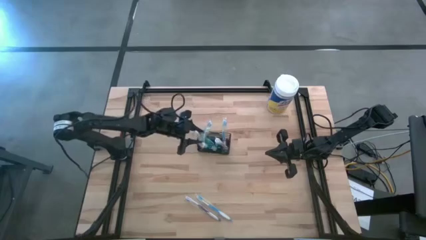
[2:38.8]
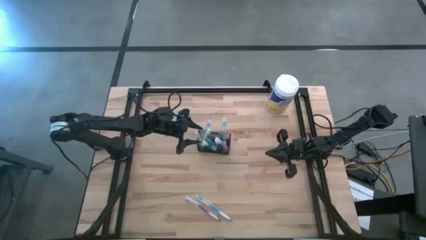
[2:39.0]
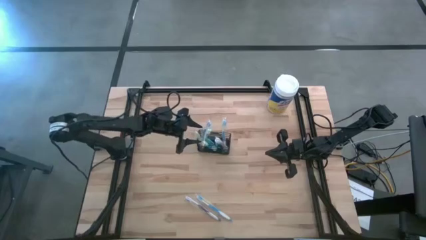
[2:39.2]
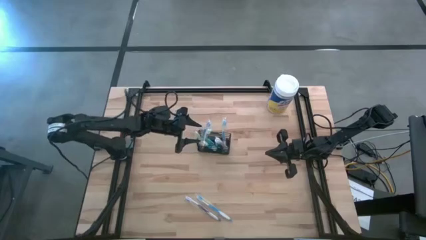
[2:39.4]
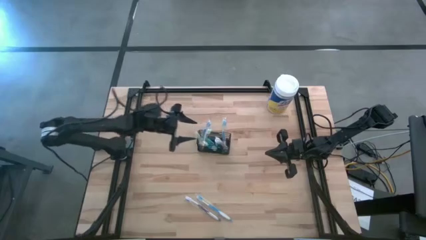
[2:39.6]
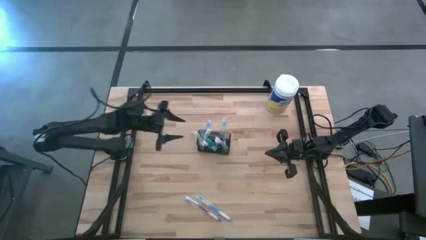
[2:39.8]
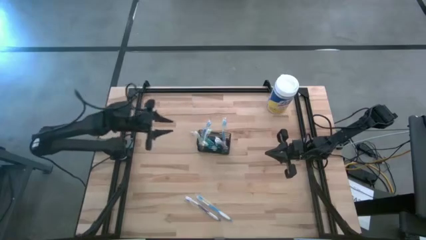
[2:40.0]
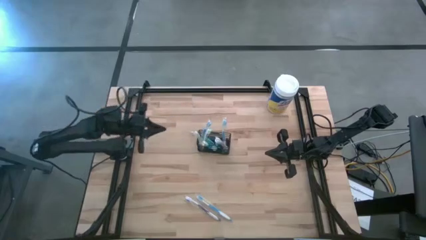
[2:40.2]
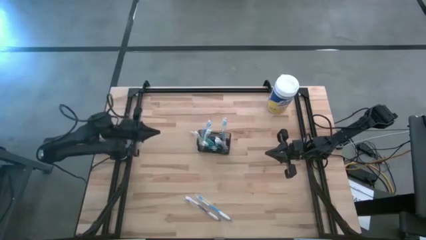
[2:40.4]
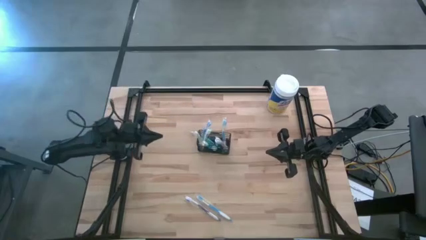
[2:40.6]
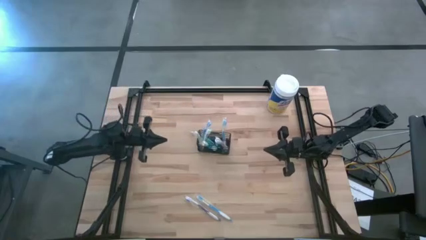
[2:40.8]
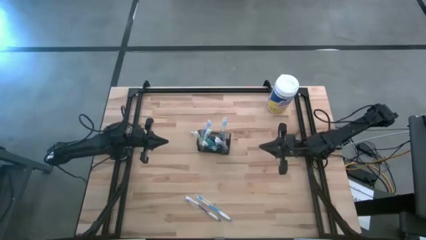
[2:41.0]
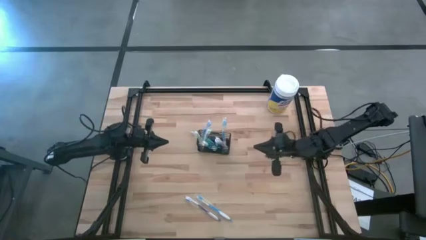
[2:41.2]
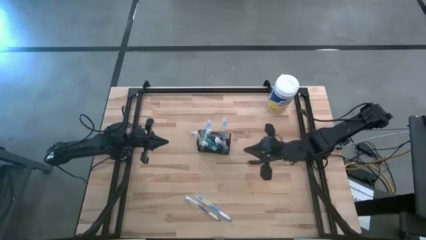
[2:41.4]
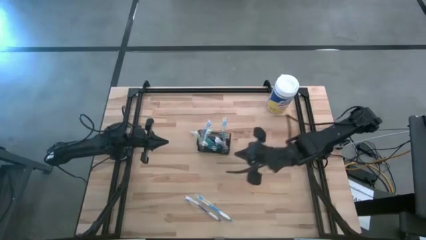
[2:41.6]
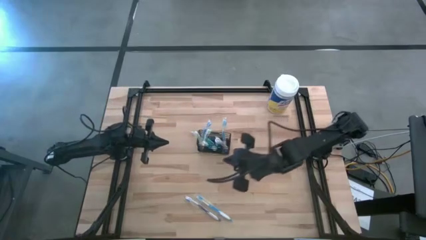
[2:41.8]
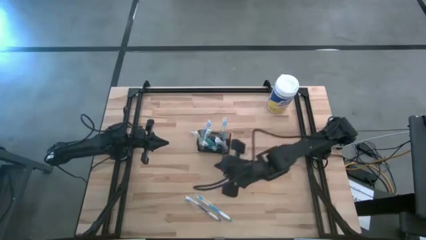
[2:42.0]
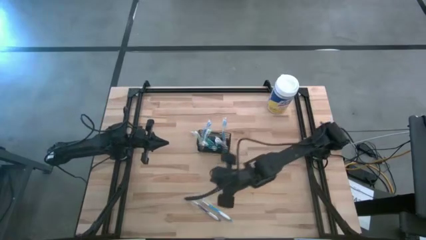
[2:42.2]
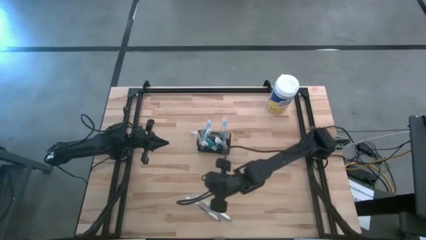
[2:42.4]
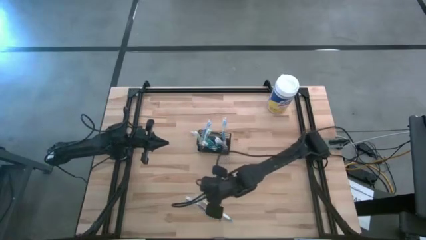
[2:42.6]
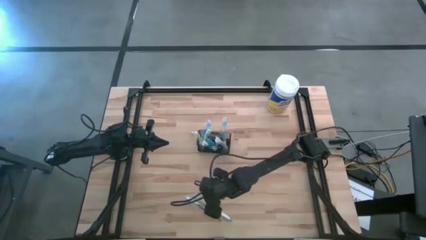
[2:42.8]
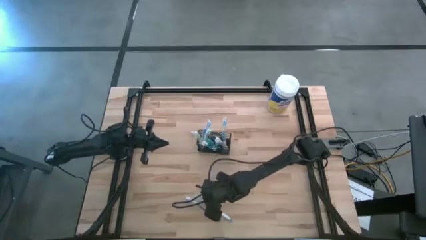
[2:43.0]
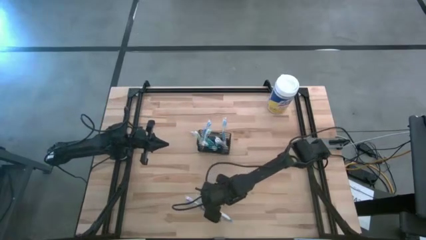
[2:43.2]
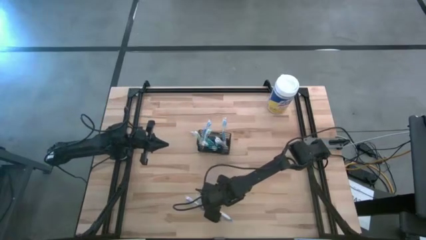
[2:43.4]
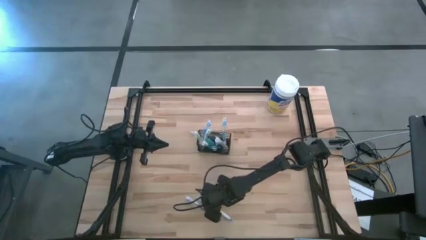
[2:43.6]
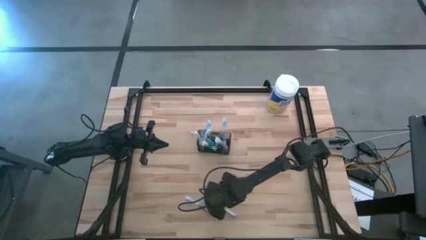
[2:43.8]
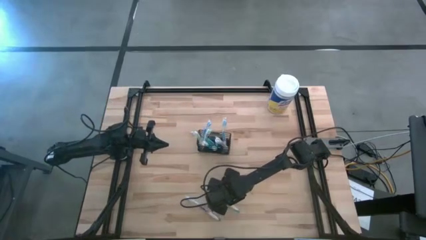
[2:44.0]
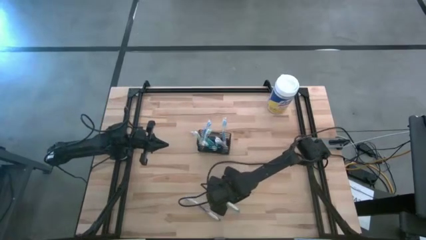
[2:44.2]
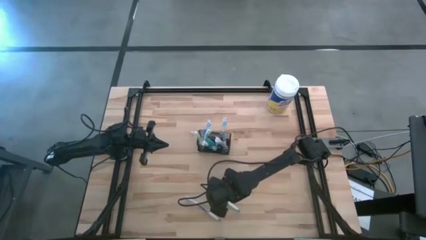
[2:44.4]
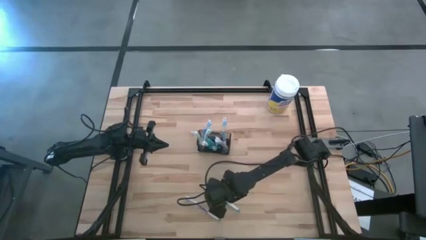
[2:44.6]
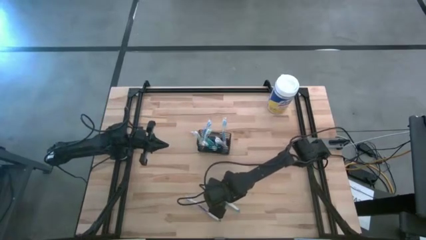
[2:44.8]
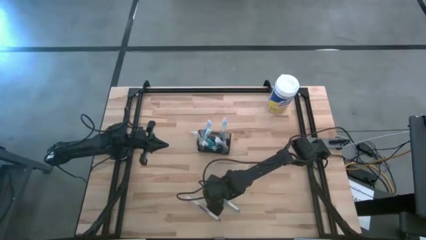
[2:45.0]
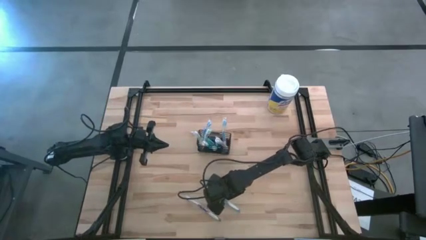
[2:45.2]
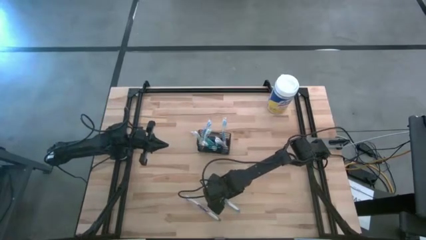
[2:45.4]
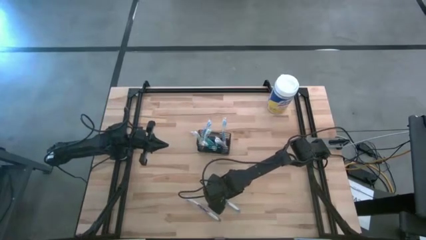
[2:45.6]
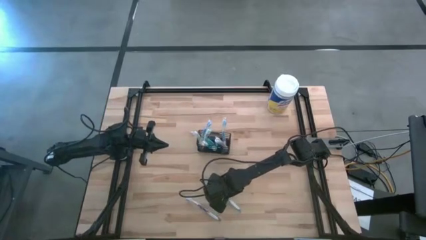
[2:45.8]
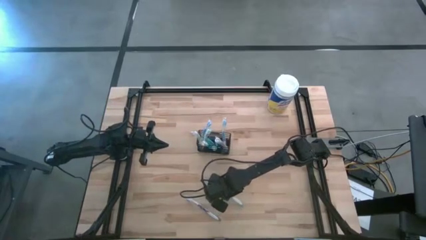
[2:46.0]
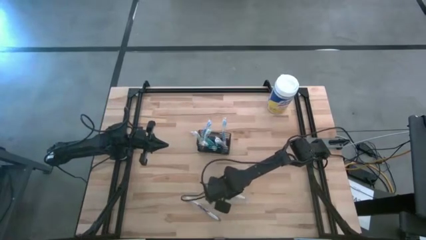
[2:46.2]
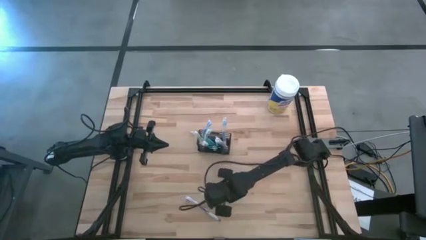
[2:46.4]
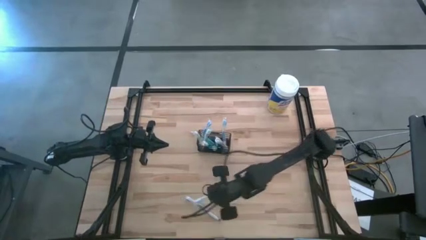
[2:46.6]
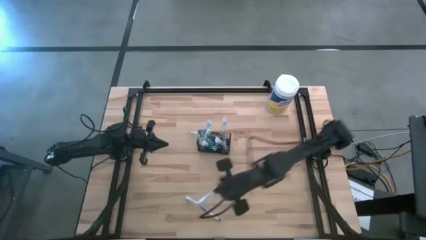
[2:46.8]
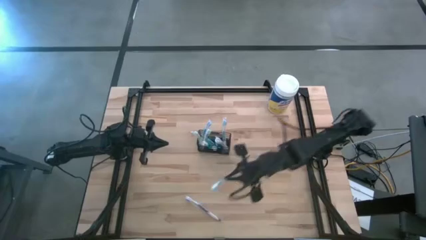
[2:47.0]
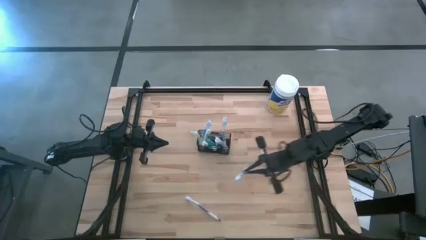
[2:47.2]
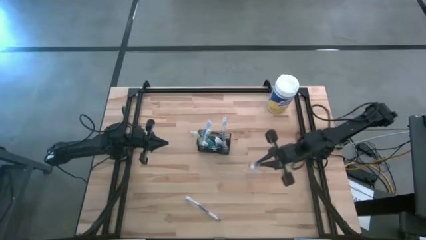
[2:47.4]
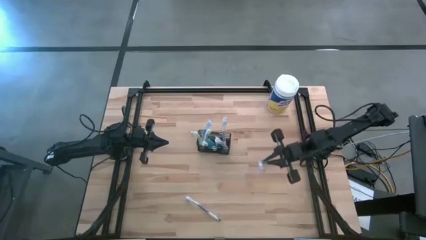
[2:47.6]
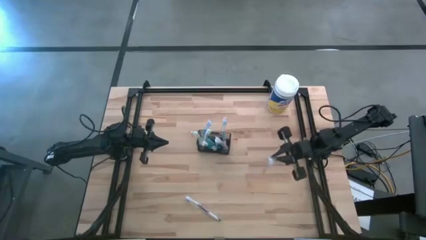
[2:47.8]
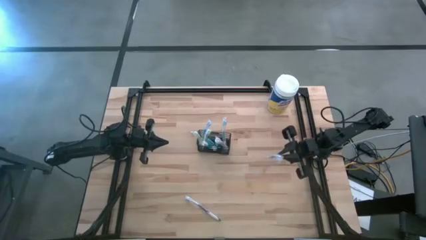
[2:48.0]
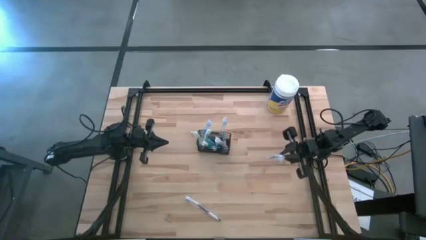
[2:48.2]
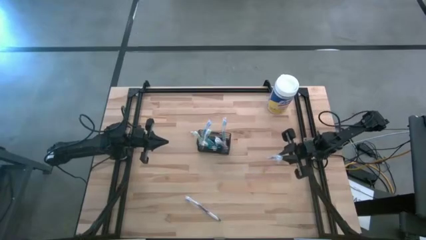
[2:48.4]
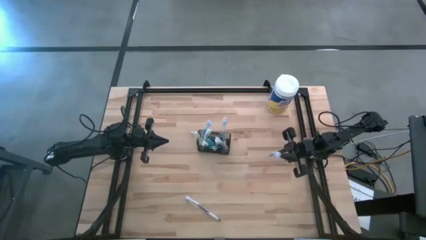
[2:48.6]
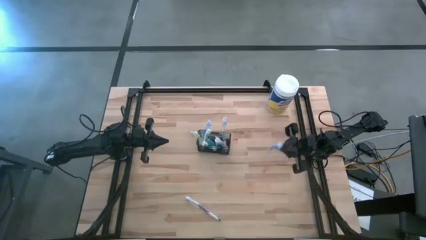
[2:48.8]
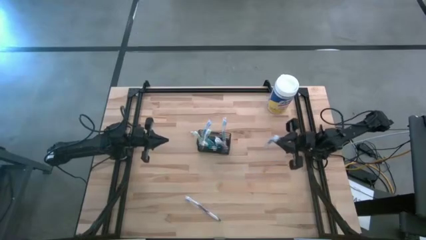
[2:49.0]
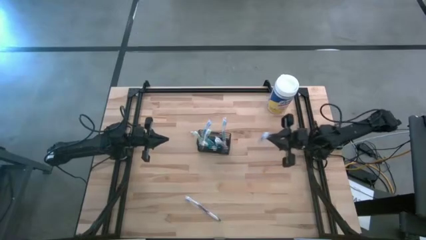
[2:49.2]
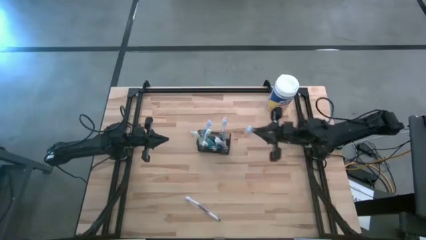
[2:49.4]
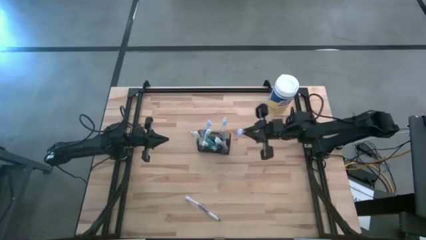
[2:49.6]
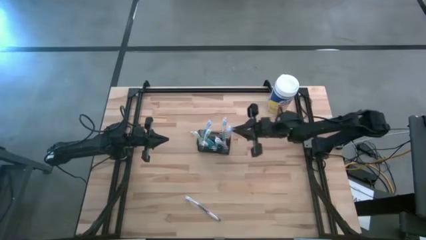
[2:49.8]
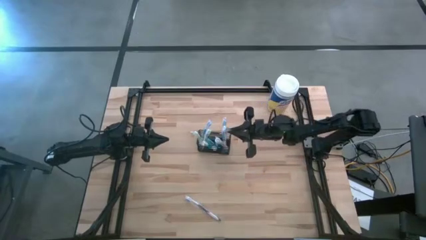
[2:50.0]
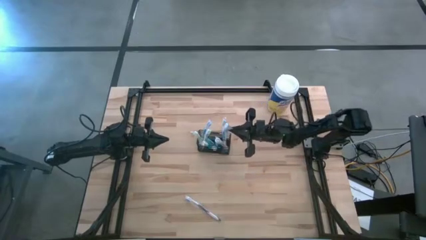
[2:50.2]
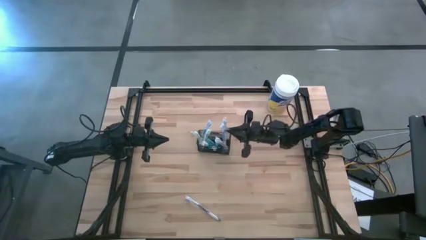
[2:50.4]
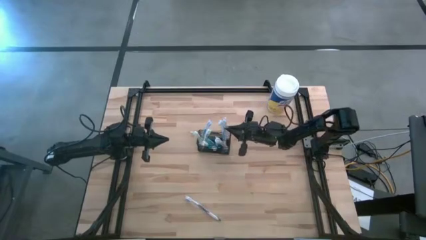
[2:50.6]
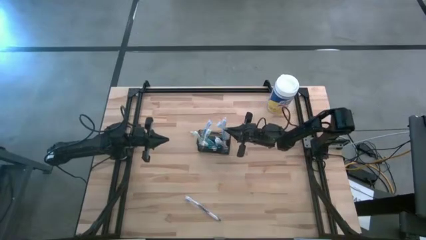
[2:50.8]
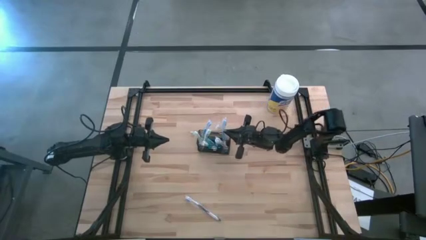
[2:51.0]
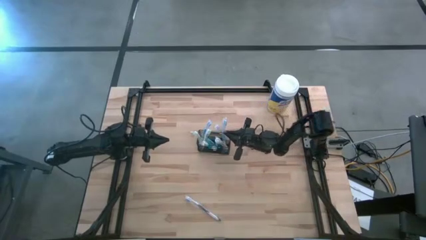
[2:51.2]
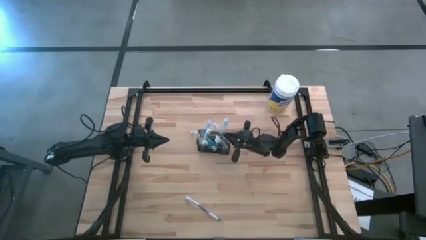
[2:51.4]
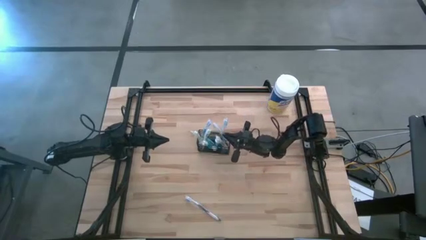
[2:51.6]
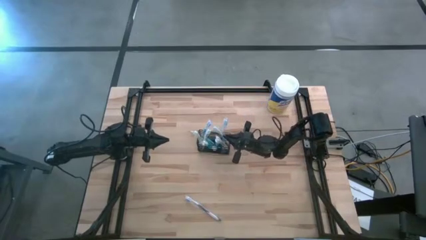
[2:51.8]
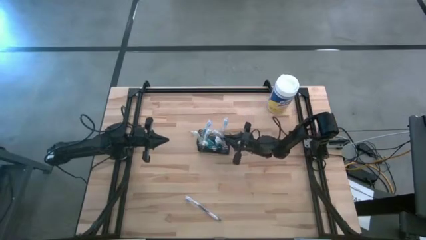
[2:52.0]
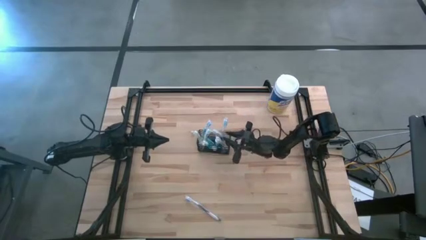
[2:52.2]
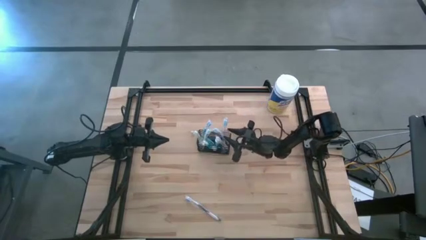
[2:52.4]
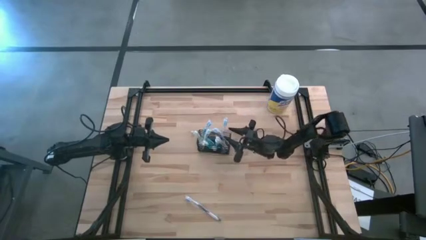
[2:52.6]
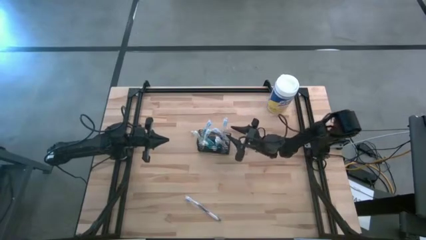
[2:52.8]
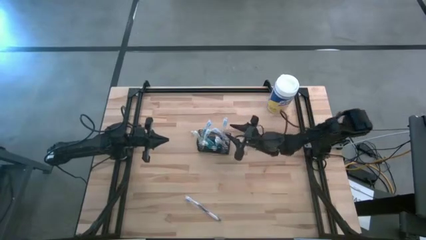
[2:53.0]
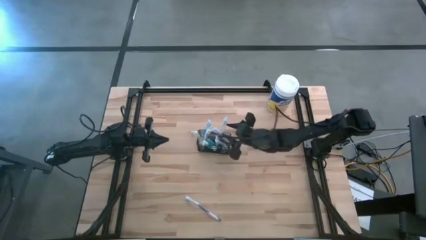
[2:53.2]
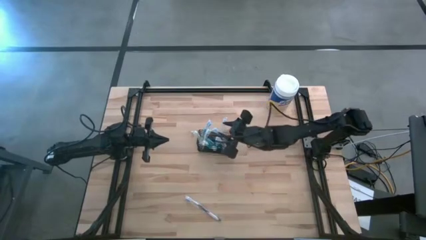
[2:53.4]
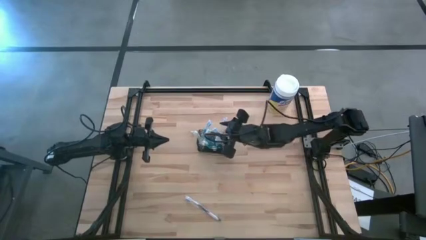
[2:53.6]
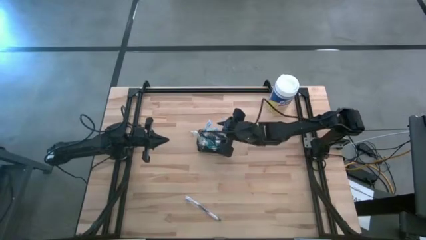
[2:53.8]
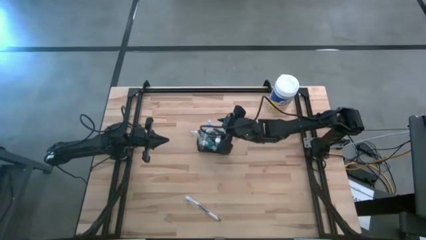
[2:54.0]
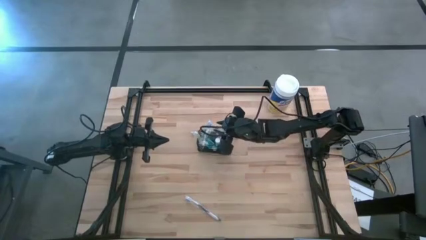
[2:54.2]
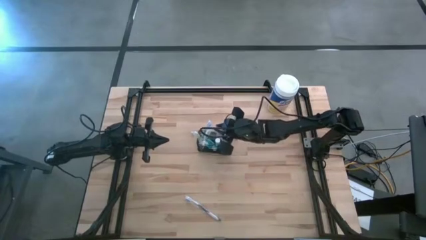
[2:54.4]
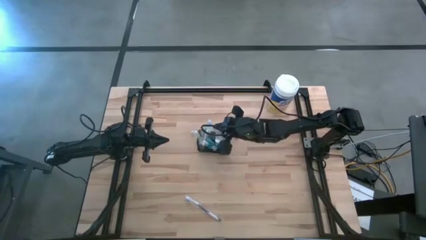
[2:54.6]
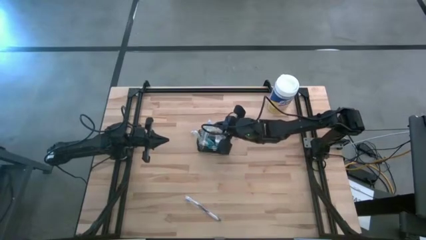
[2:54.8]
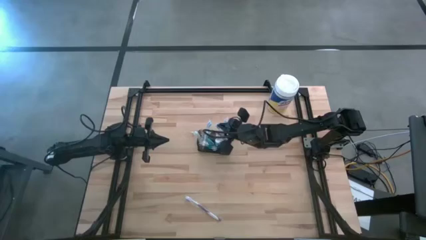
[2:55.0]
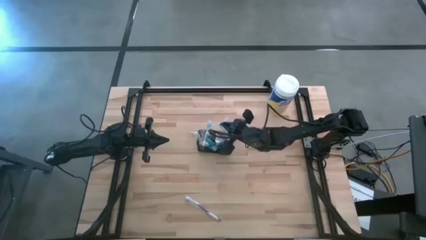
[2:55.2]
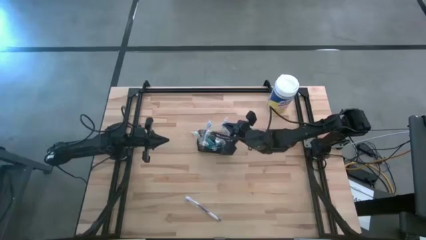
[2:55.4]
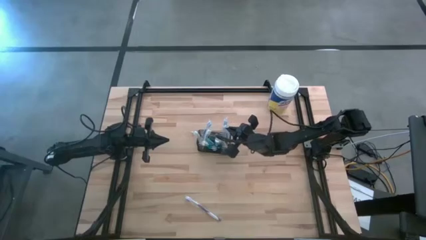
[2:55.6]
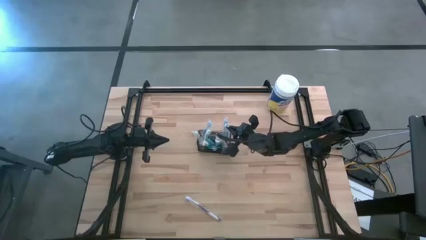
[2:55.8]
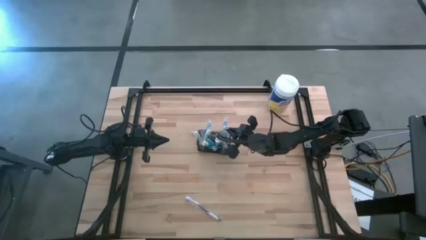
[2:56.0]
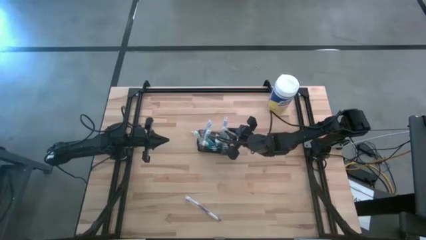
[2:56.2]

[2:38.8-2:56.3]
Task: Pick & Place toothbrushing station
Put the blue toothbrush into the black wire organizer

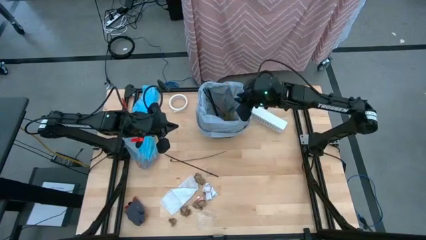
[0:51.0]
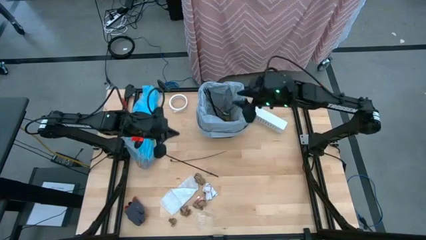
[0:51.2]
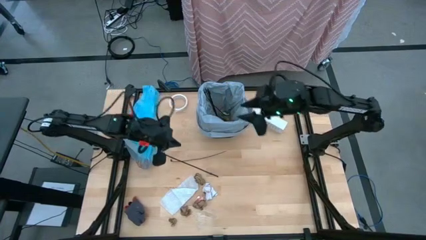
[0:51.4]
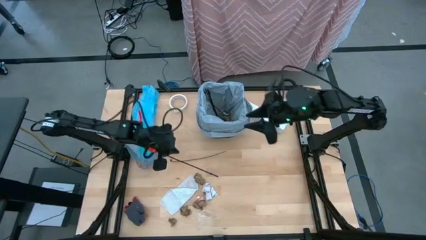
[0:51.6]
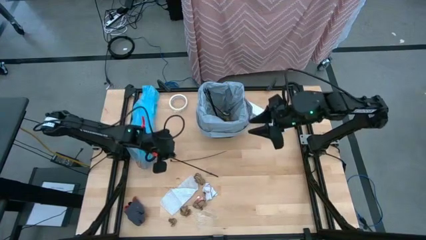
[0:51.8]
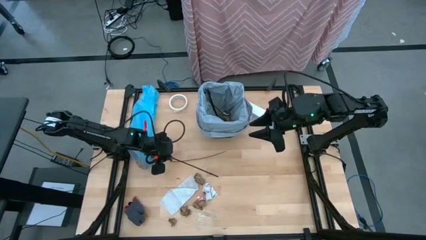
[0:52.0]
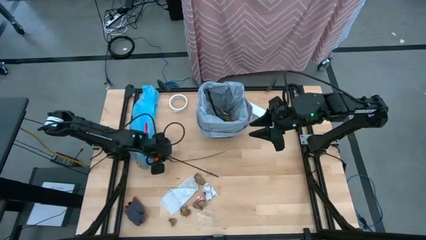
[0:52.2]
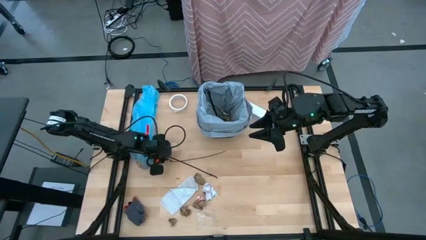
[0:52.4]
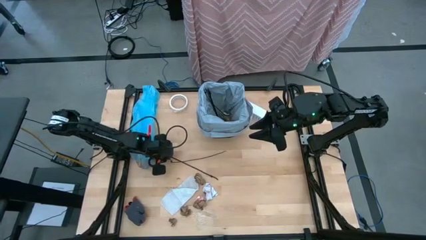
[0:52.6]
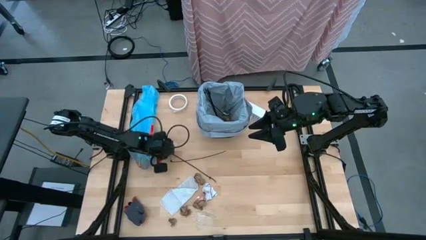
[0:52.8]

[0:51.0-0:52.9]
Task: place trash/remove bag and relplace
Put the zip tie into the trash bin
